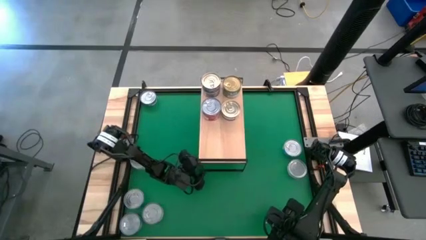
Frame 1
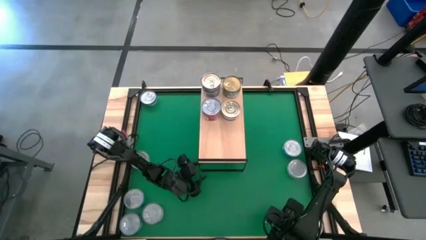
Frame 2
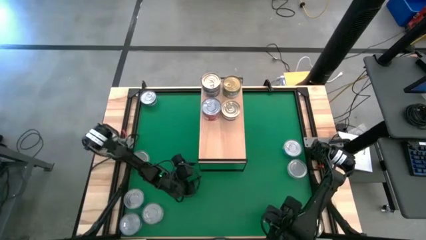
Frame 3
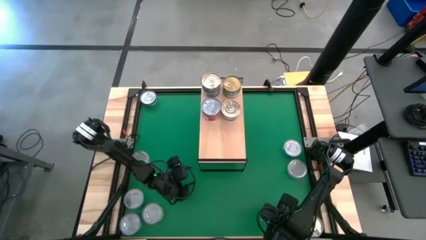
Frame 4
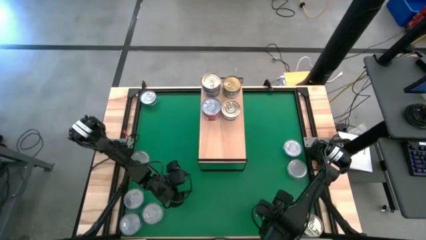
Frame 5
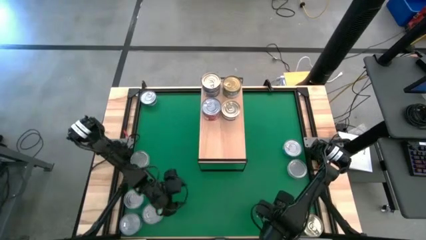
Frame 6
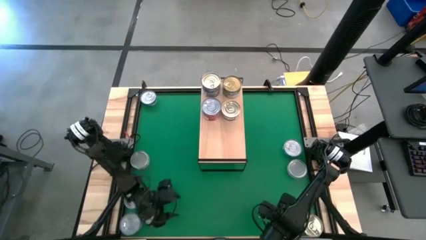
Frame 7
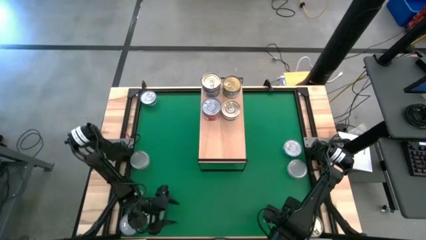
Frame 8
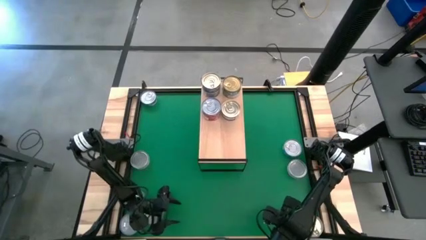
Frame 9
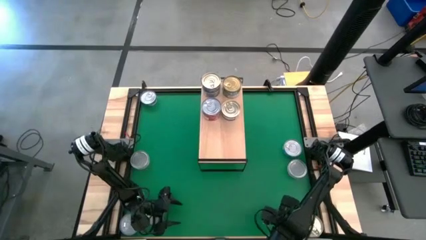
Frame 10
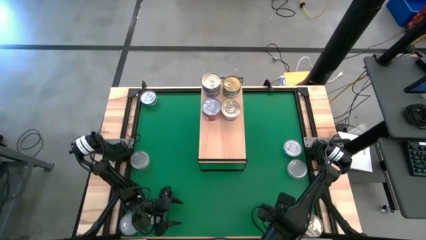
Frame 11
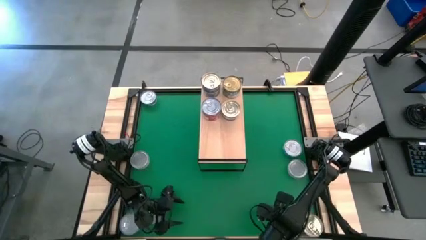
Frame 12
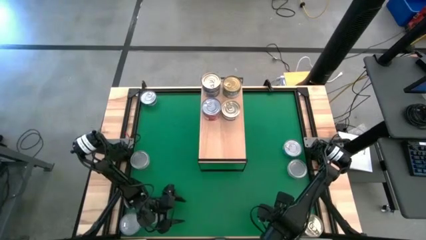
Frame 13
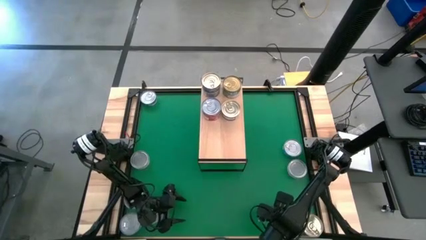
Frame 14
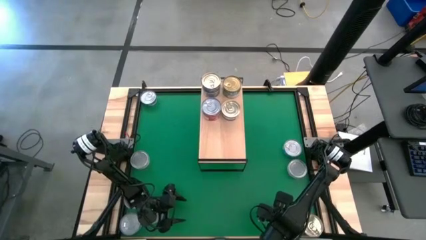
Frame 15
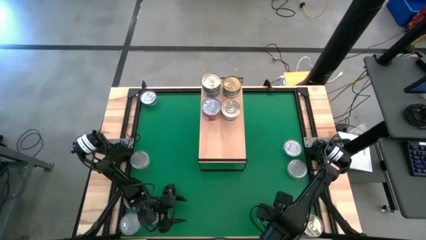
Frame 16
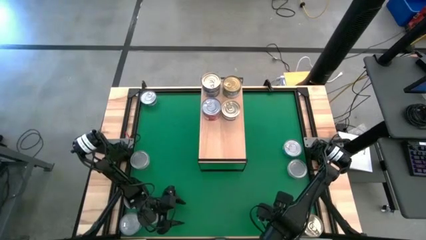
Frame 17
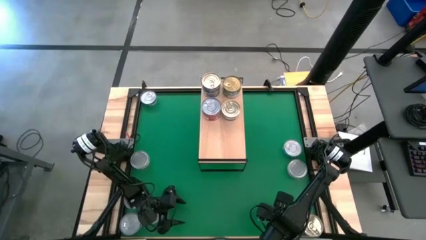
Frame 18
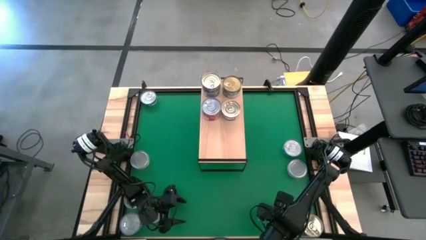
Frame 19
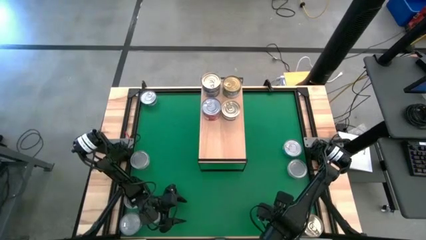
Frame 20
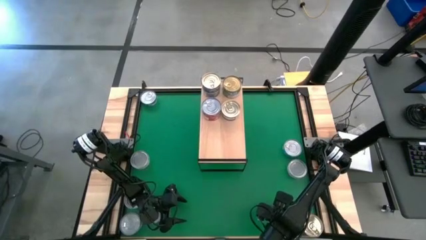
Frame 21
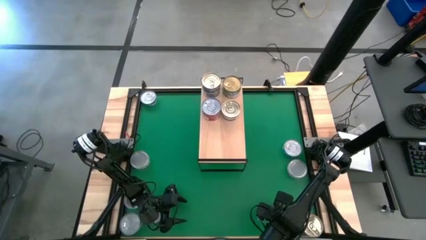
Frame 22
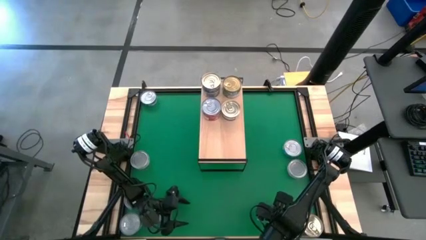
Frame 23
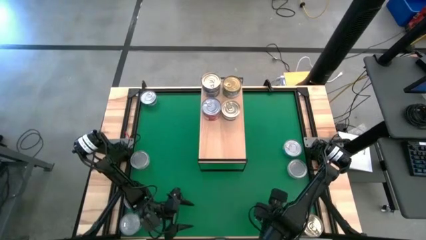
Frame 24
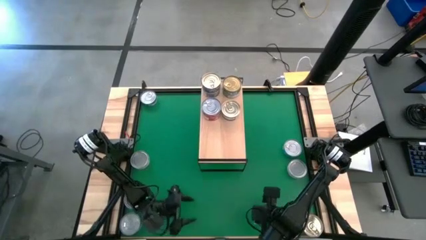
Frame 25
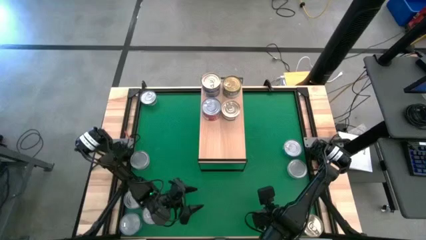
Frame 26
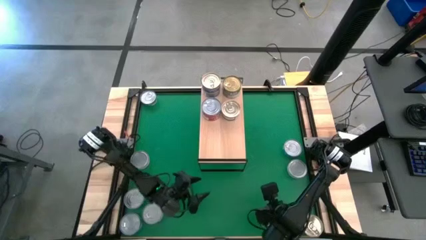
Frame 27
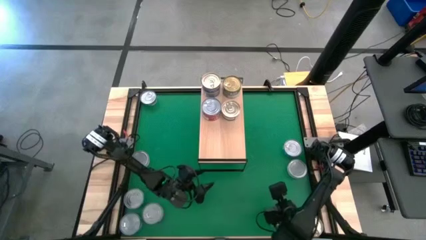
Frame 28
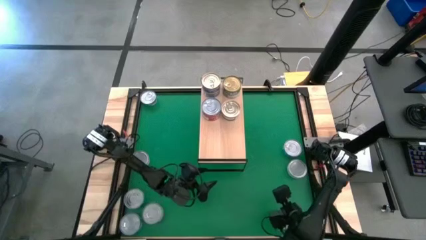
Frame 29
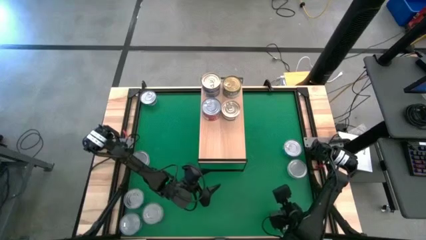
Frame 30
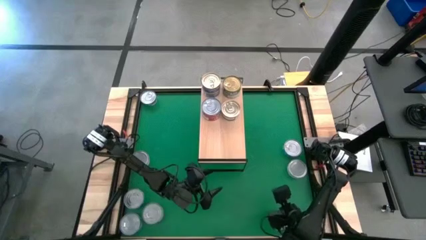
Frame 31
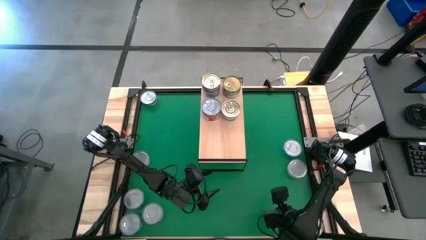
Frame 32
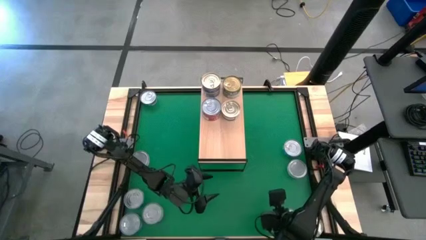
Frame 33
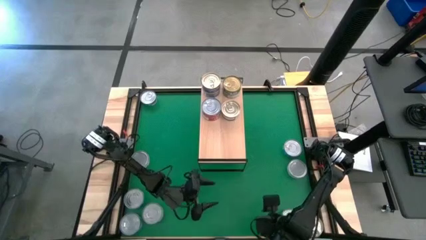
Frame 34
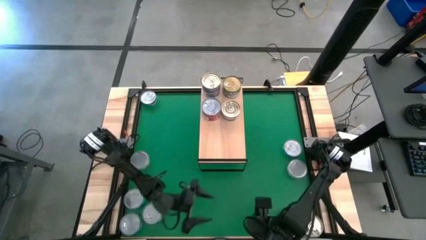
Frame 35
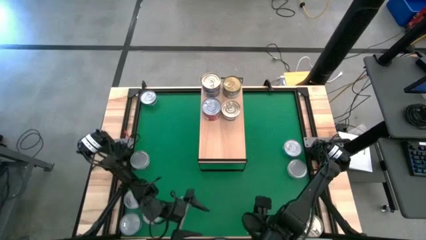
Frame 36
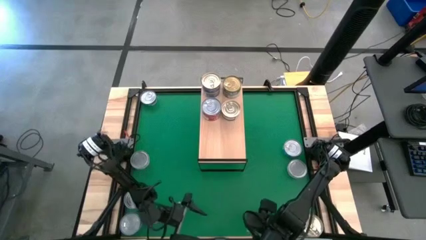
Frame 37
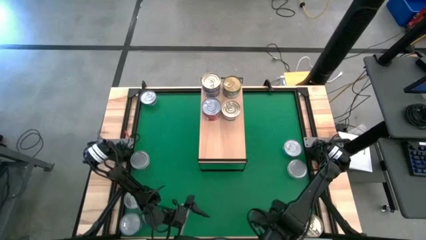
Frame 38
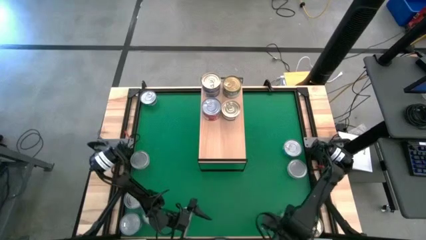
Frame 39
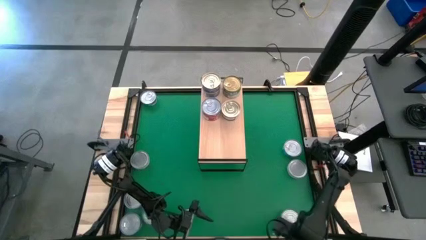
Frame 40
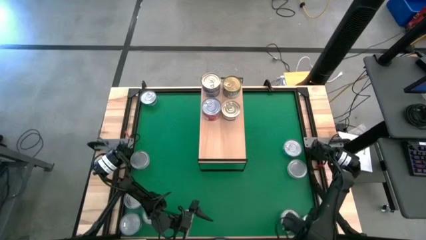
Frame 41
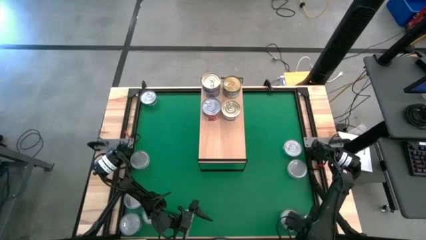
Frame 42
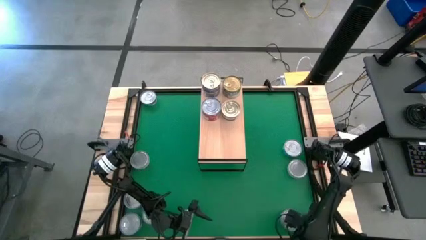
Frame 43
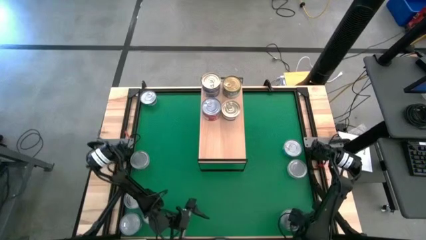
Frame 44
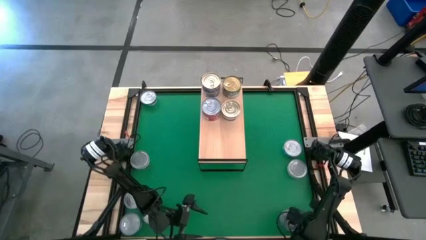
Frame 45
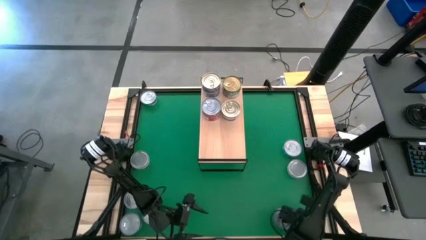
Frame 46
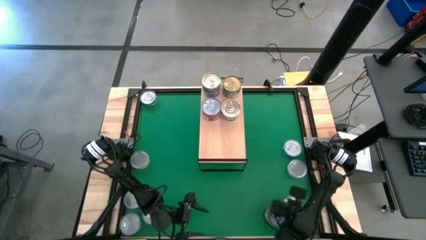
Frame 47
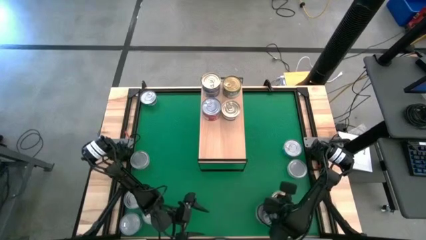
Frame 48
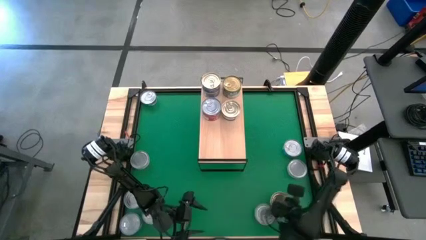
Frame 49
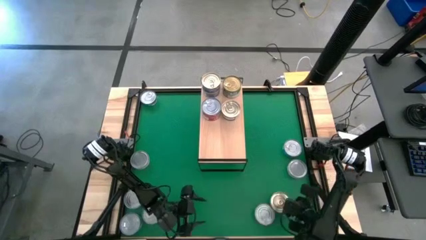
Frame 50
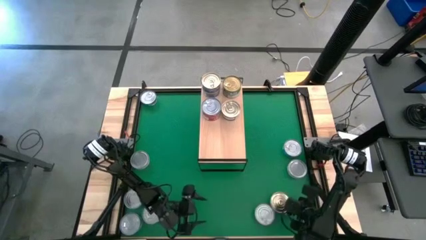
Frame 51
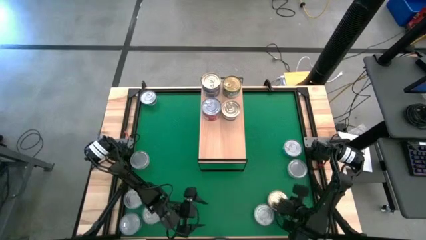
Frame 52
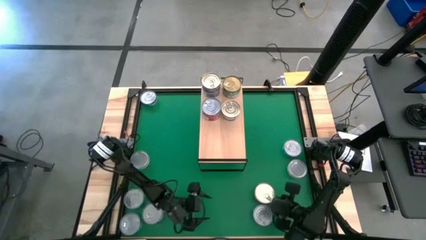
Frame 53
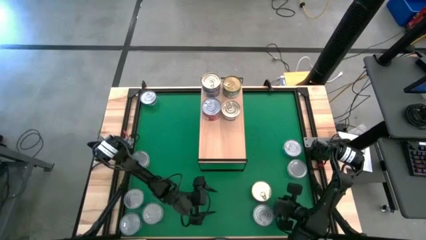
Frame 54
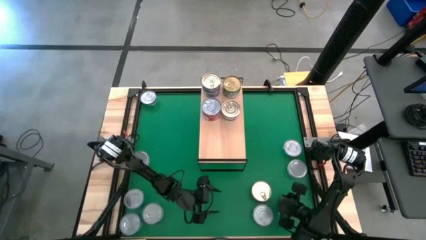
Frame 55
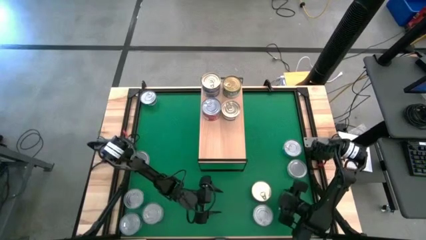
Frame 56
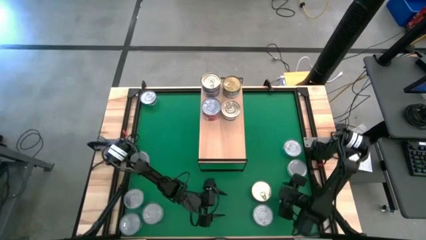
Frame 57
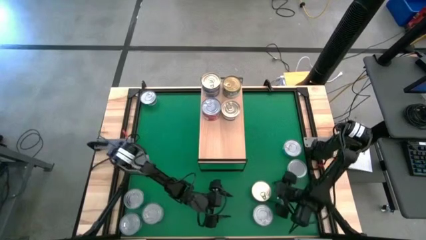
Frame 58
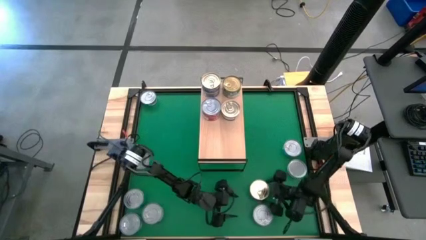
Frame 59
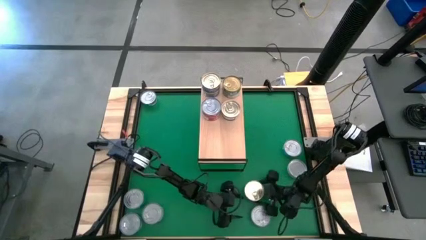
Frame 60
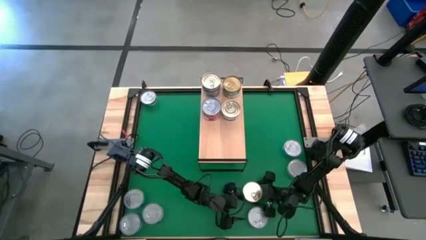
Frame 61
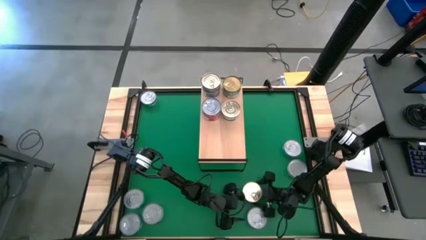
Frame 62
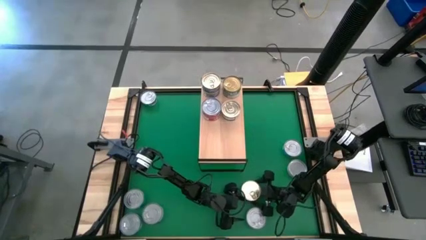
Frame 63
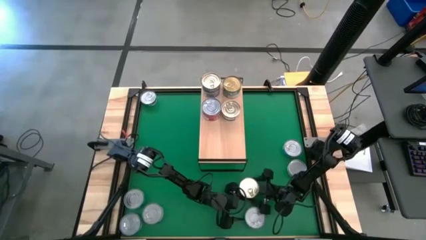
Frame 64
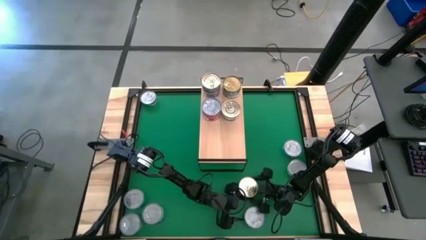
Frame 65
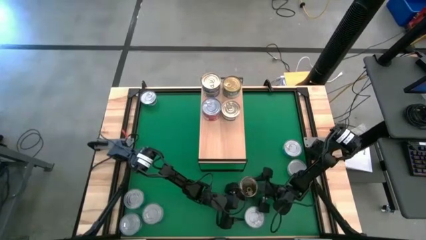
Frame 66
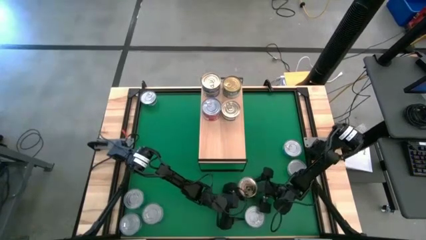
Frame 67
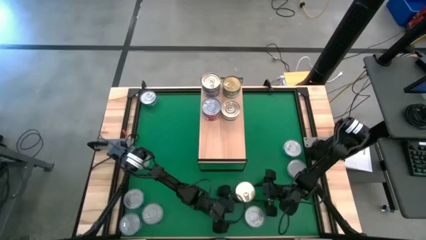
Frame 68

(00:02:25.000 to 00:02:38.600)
Task: Stack canned seafood by type on shelf
Stack the blue pink tuna can on top of the other blue pink tuna can on the shelf
